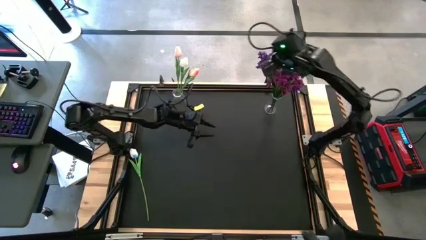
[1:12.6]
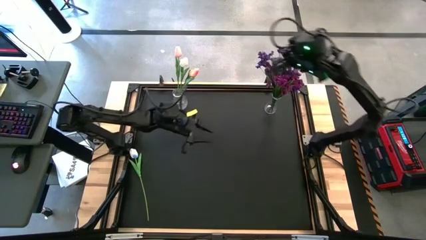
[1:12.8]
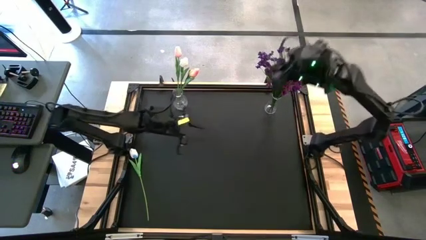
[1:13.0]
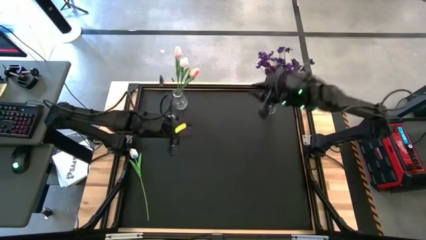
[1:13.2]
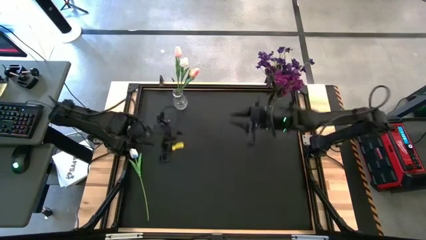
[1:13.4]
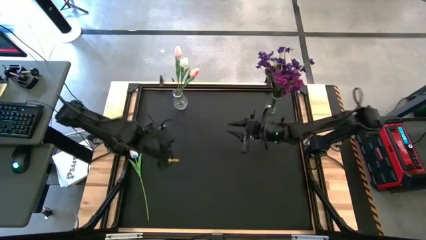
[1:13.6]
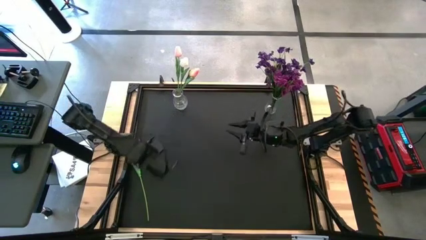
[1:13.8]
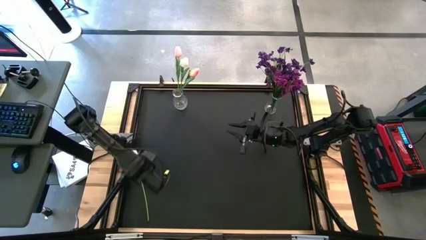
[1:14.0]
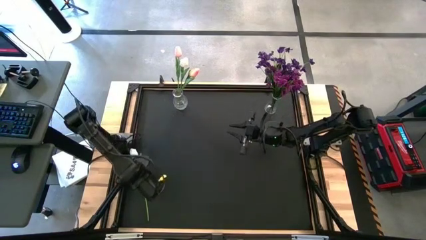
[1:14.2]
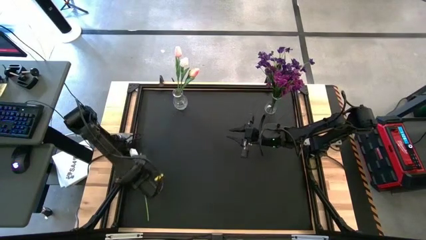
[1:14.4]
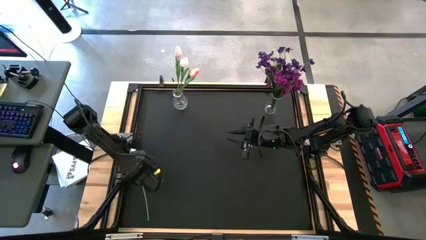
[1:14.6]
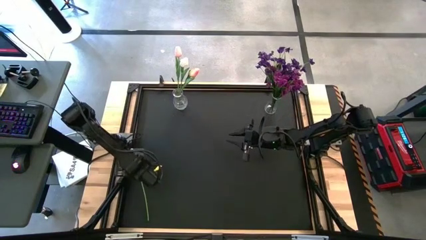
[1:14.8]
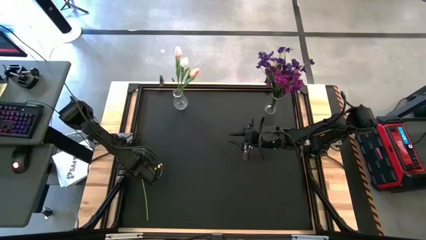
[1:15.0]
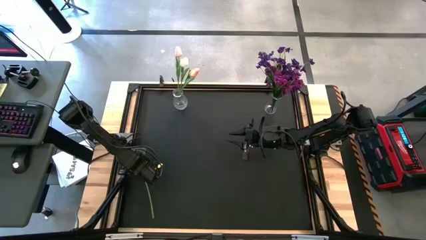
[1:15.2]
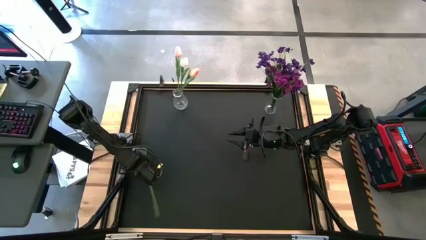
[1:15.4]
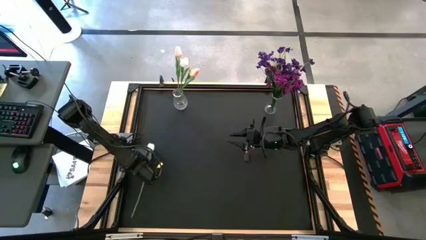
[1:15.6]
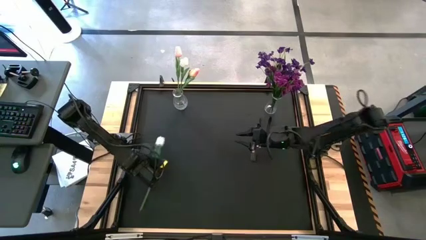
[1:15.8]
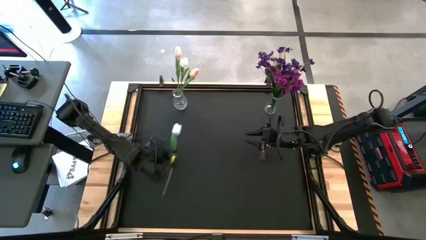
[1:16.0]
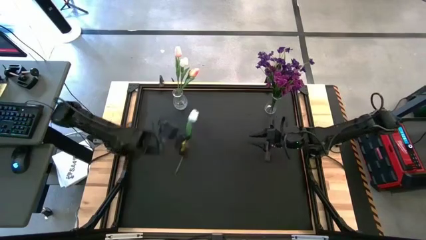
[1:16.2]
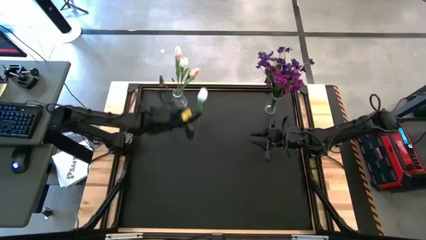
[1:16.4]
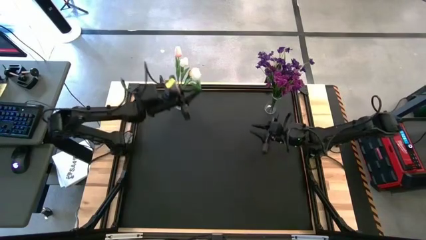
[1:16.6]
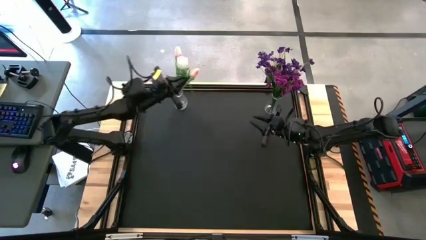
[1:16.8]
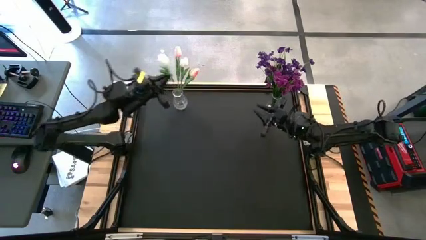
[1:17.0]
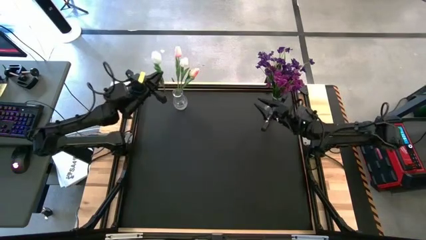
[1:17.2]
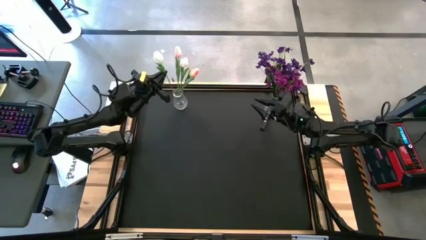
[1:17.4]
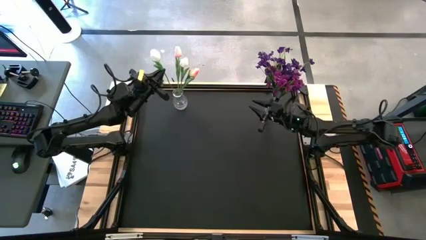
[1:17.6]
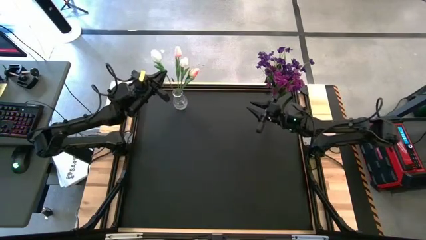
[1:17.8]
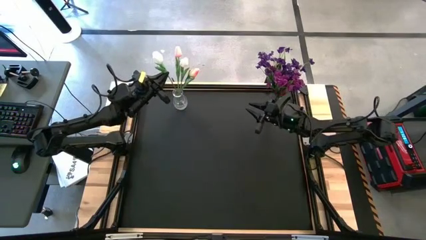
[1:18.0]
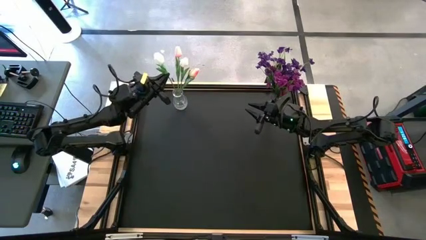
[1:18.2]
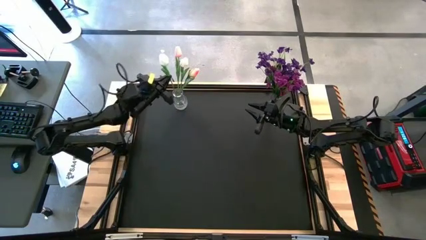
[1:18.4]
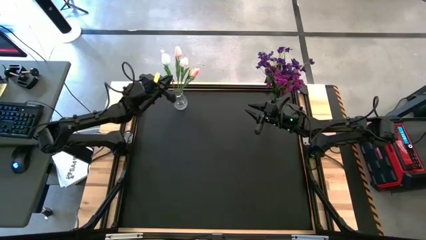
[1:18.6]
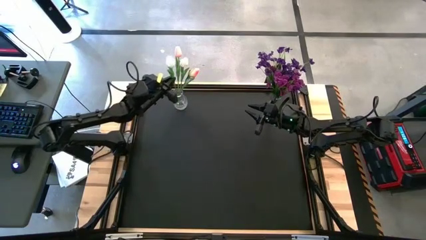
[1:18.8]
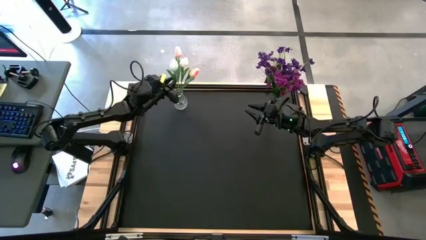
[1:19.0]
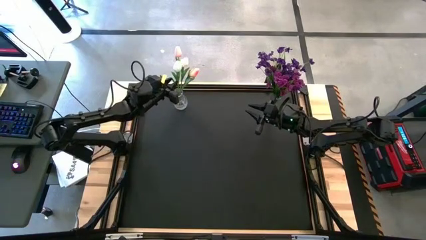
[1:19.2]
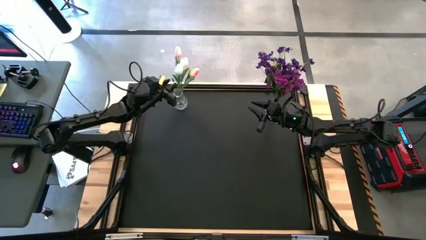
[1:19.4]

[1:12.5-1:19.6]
Task: Sort flowers into vase by color
Put the white tulip into the left transparent vase

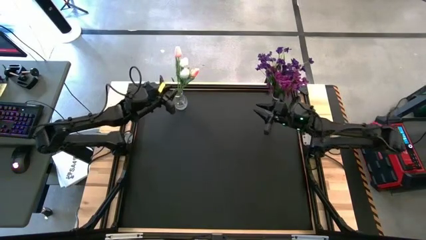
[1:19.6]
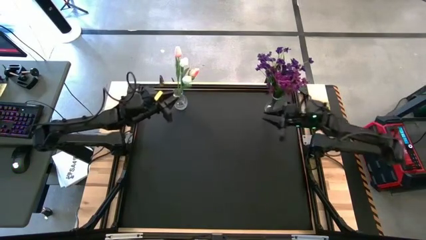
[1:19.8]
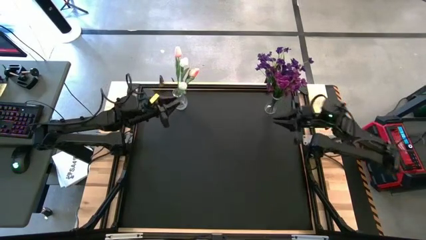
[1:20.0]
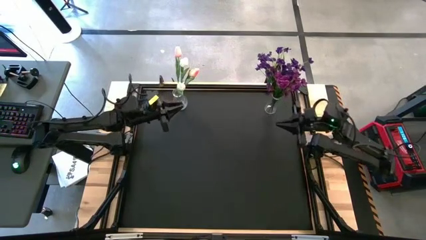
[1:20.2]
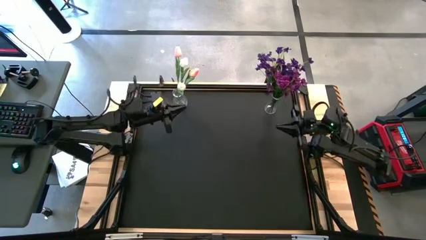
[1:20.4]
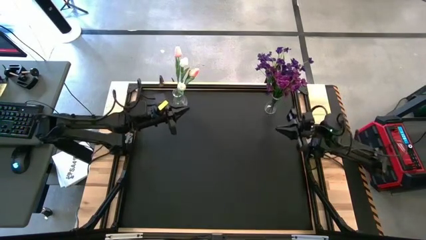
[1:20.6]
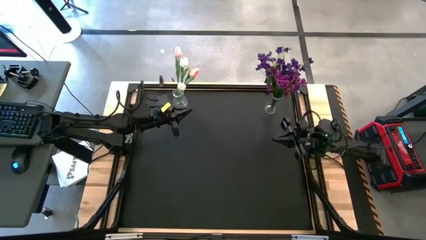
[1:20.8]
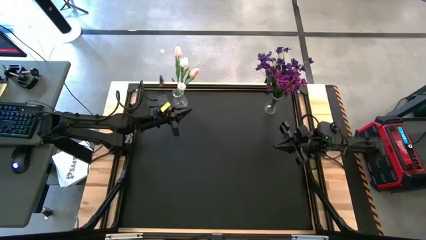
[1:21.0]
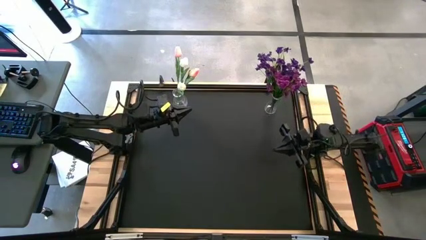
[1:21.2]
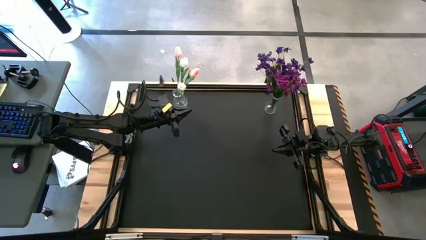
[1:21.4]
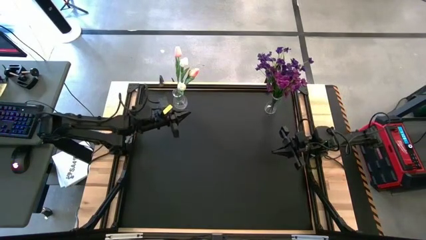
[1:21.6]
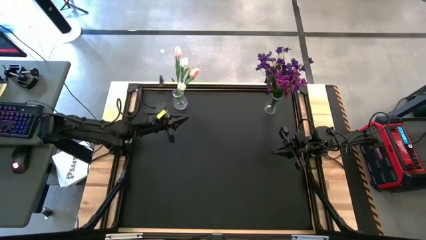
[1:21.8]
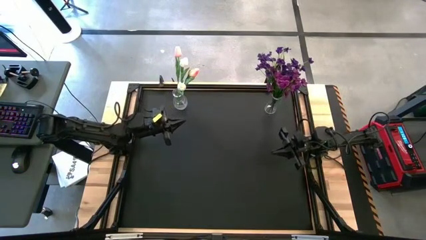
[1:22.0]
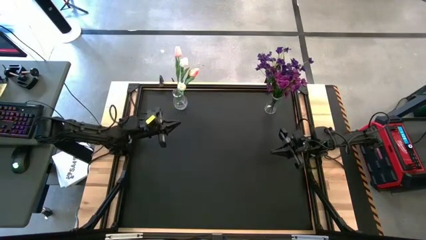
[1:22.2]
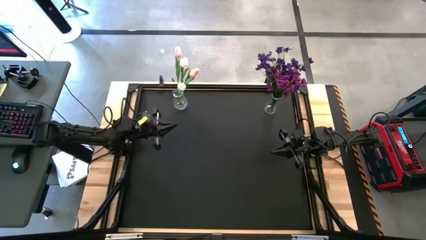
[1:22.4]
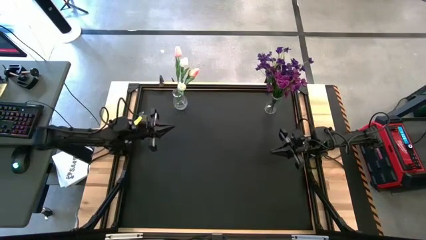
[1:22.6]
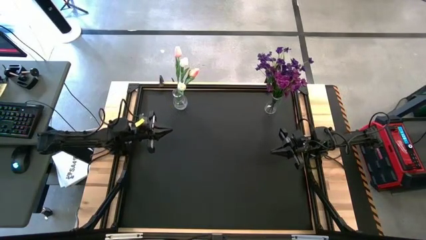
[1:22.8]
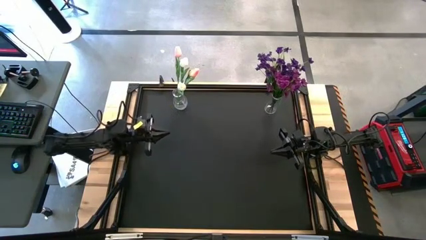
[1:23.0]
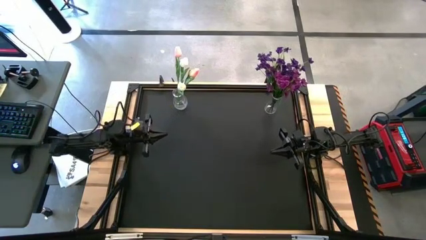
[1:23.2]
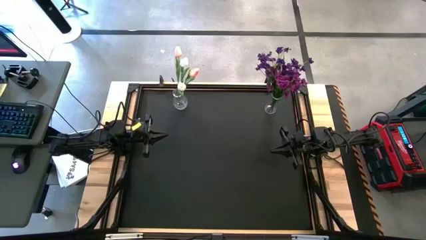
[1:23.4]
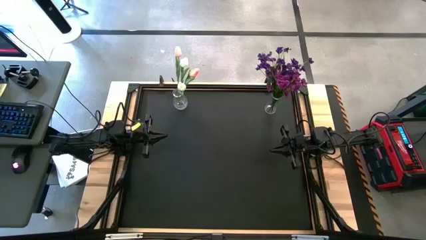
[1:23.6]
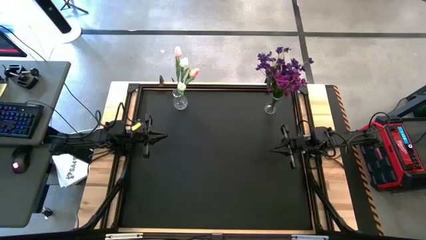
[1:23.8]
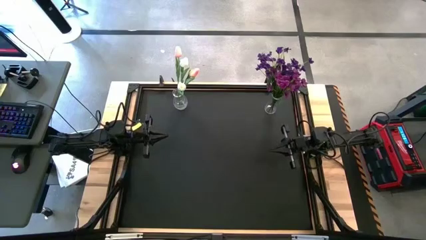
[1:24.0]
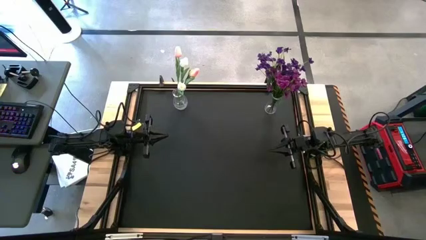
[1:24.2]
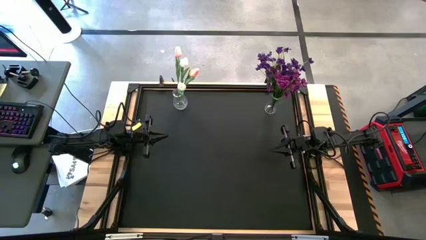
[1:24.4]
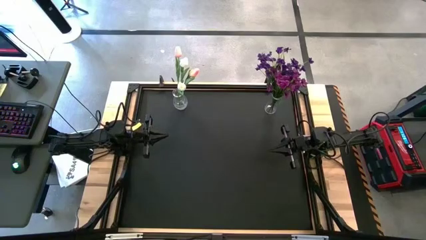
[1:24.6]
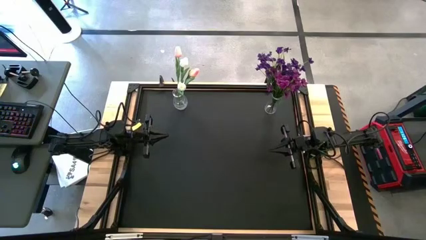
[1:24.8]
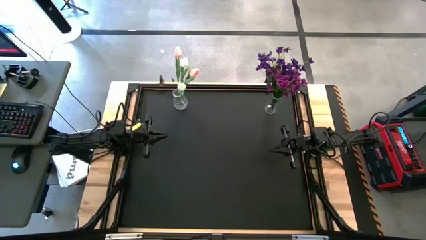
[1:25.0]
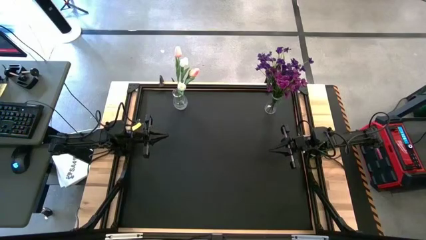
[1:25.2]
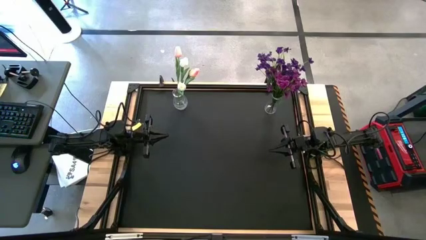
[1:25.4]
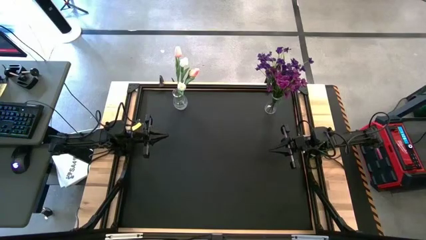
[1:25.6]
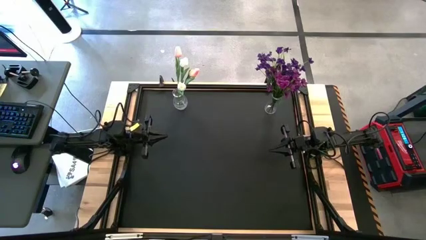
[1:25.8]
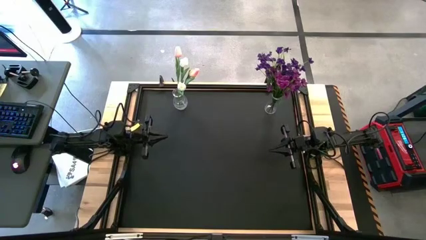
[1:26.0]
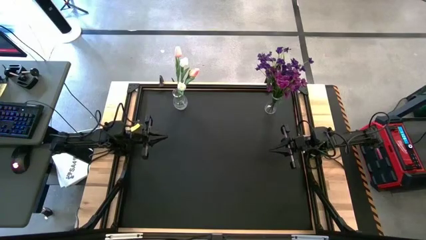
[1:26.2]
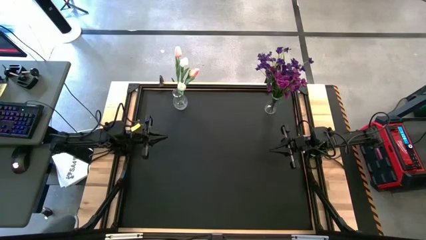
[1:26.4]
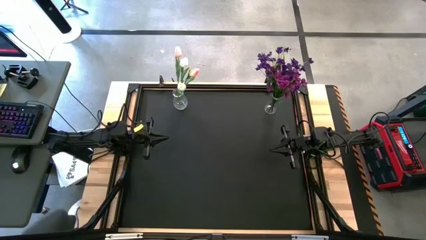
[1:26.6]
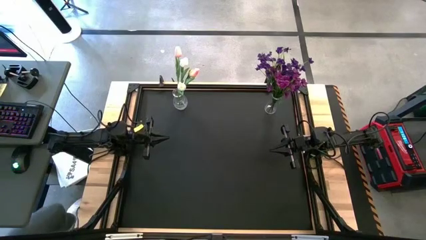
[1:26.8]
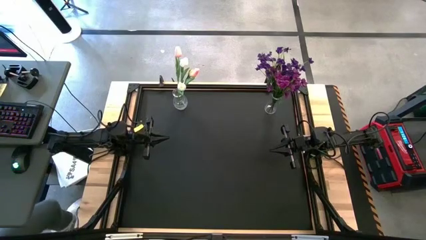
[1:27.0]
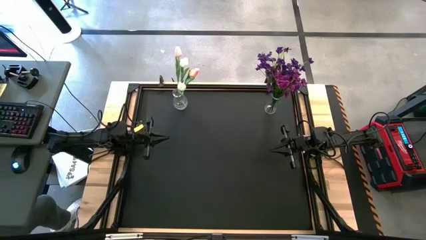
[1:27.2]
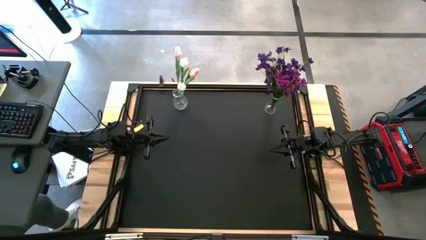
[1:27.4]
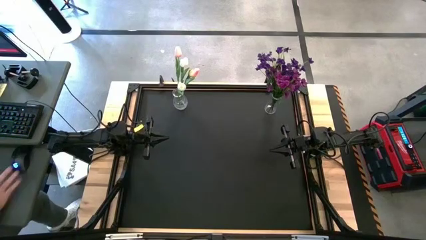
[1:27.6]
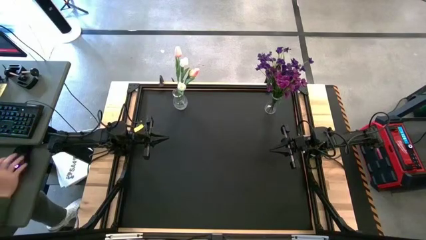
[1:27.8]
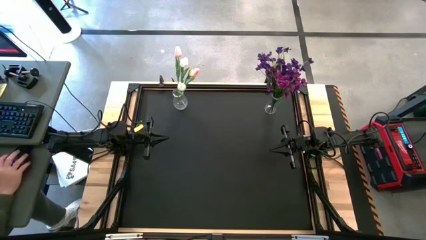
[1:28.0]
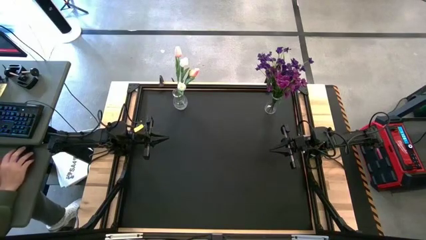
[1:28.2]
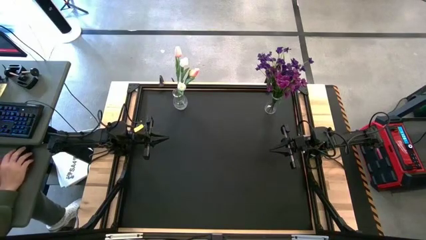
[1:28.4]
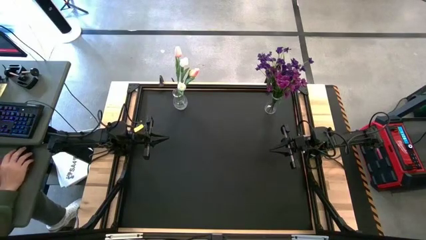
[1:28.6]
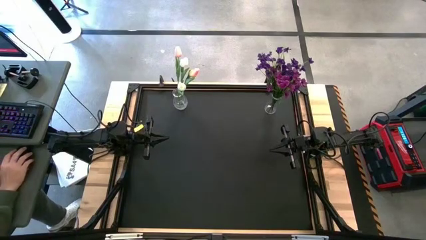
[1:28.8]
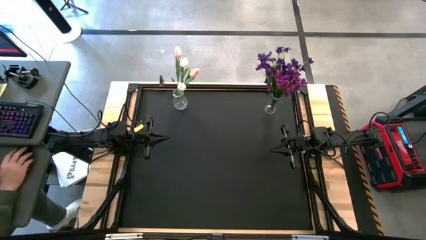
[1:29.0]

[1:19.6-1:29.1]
Return to Home Position
